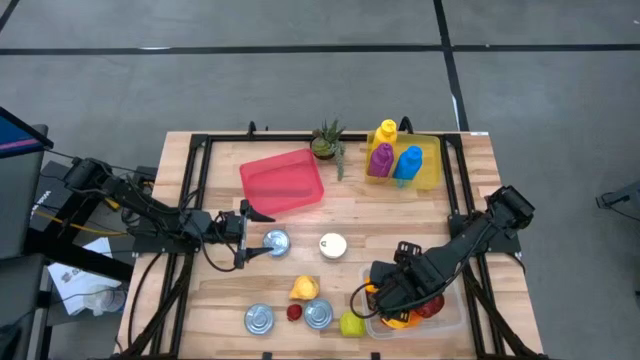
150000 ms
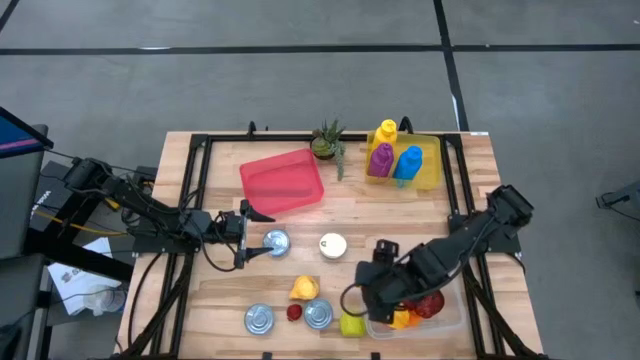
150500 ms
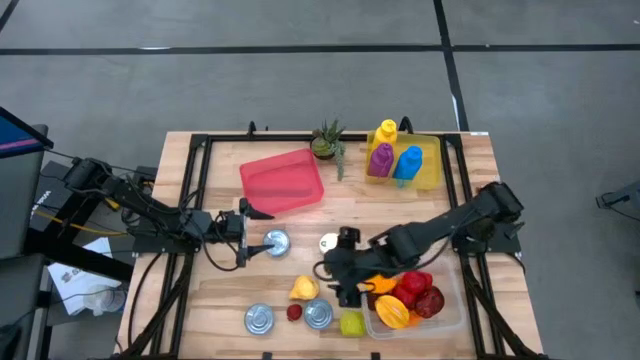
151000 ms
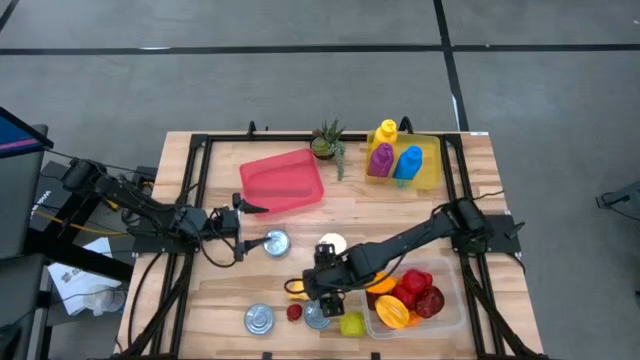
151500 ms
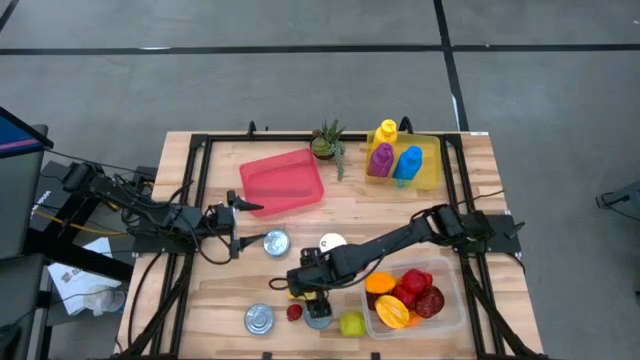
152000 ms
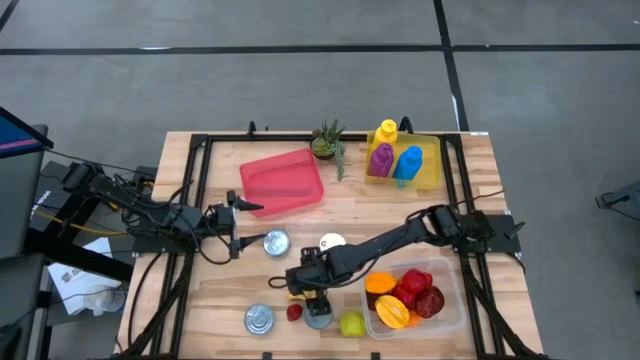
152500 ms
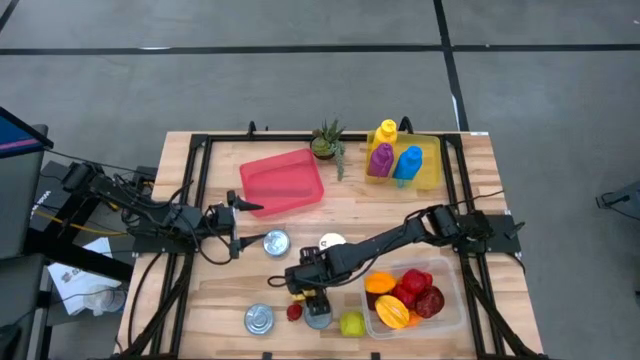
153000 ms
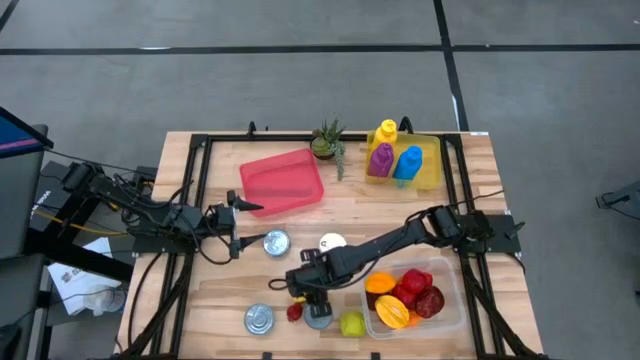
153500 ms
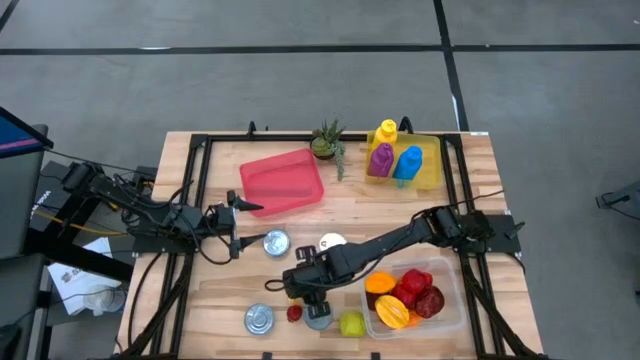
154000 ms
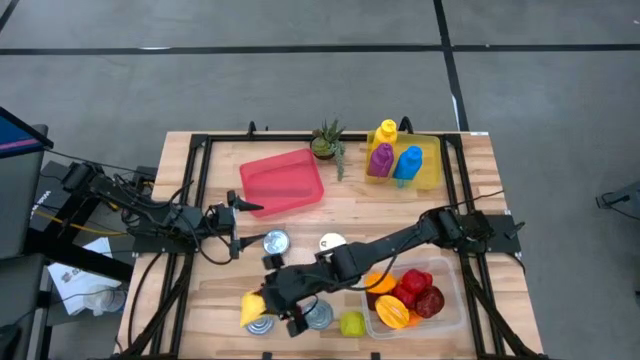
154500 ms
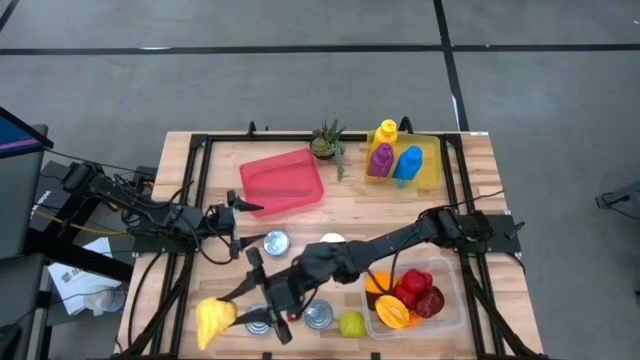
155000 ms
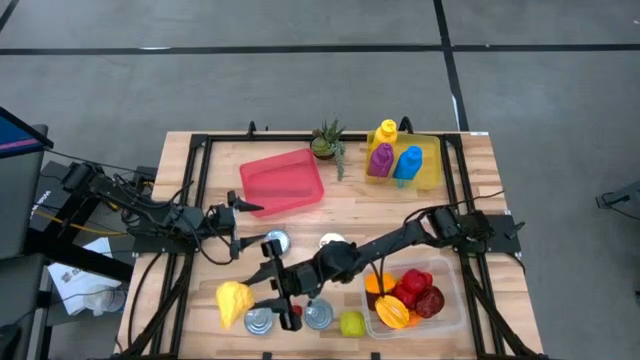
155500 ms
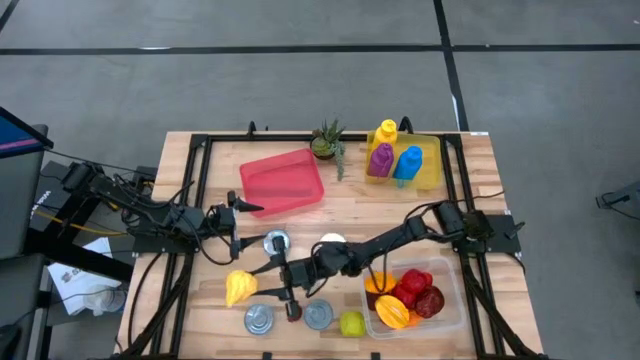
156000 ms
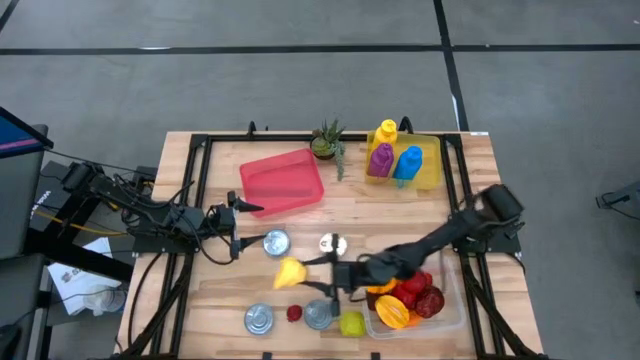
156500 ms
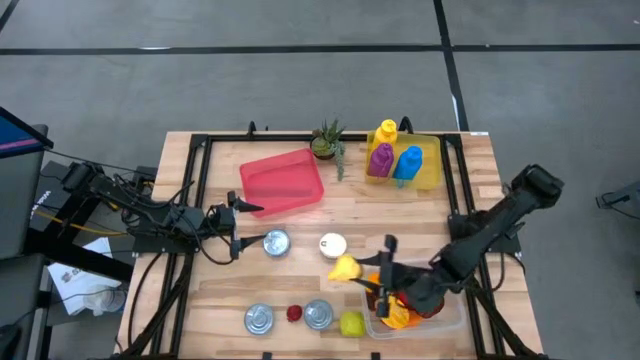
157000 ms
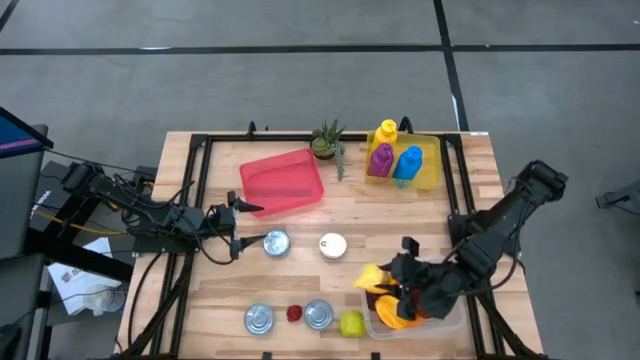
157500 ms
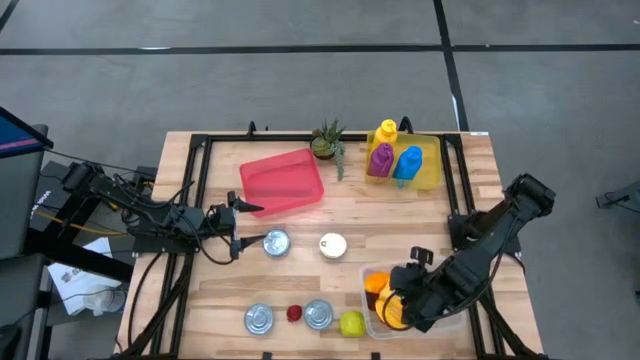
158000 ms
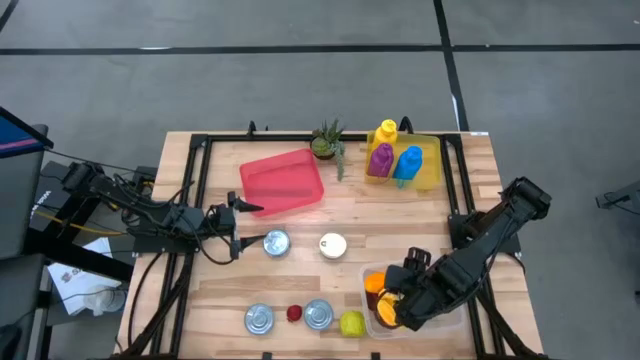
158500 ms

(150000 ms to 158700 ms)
Task: Pick & Place Food Item
Put the yellow pear into the transparent bin

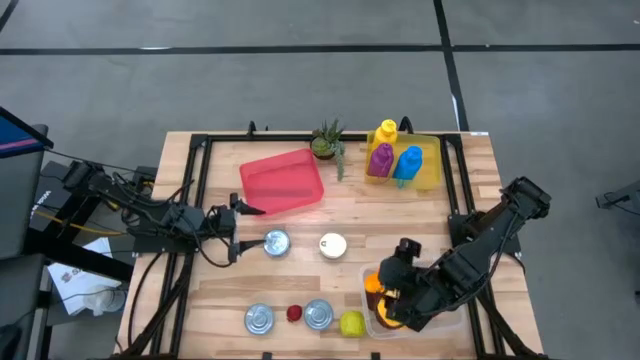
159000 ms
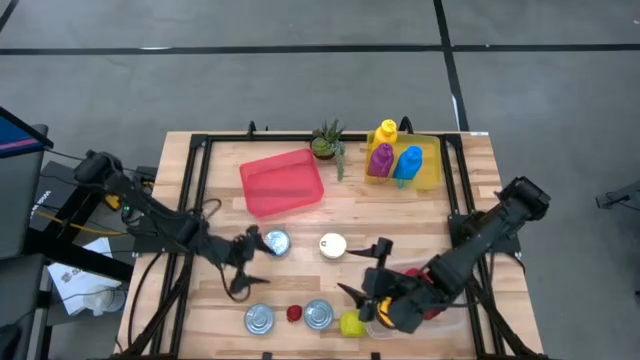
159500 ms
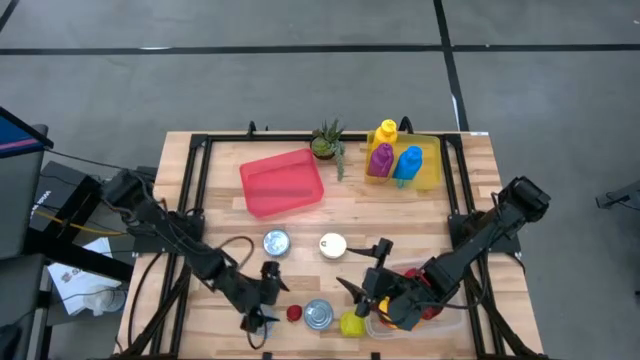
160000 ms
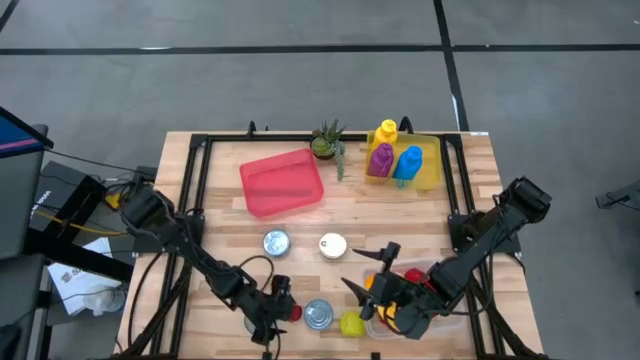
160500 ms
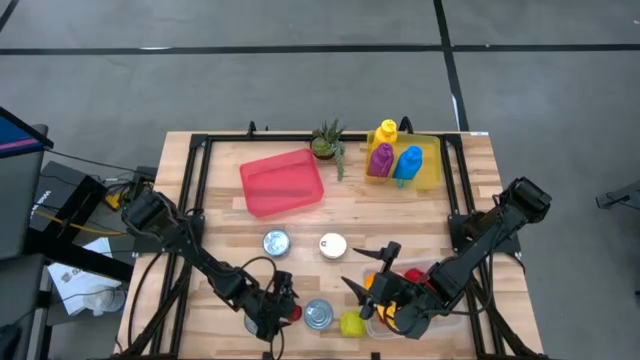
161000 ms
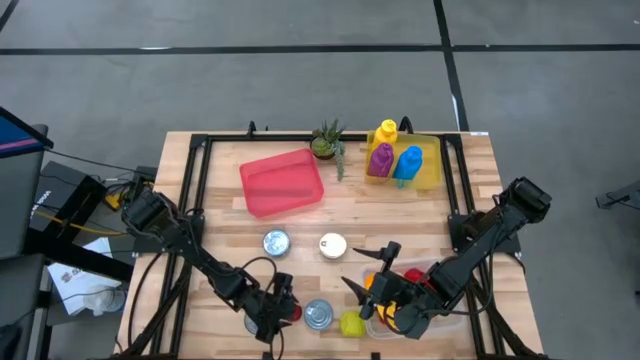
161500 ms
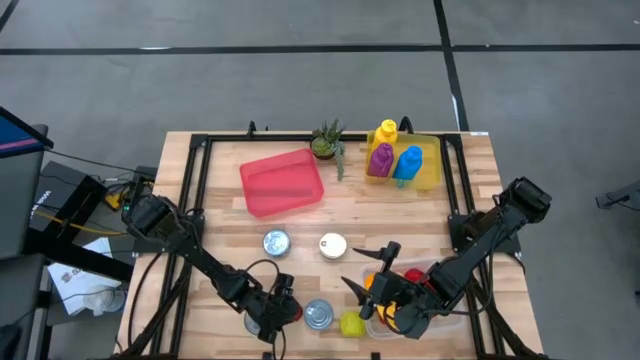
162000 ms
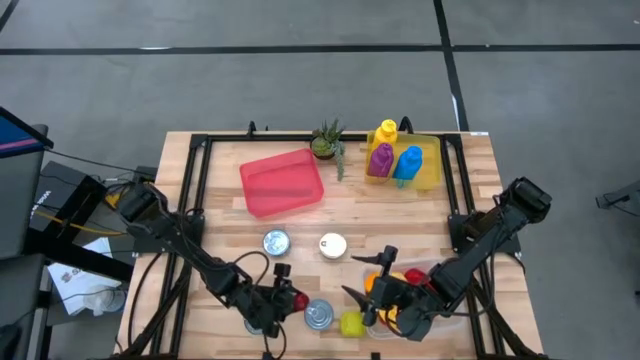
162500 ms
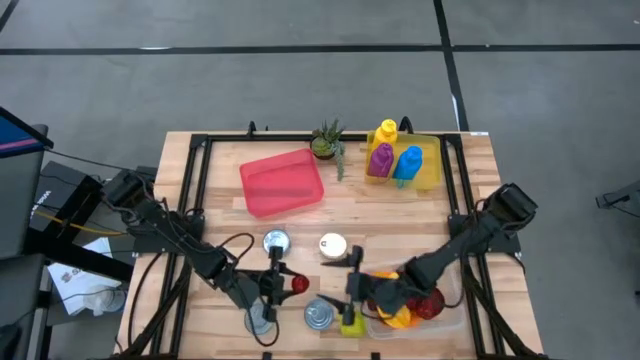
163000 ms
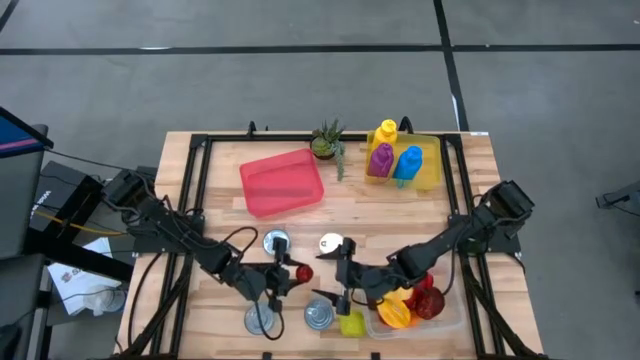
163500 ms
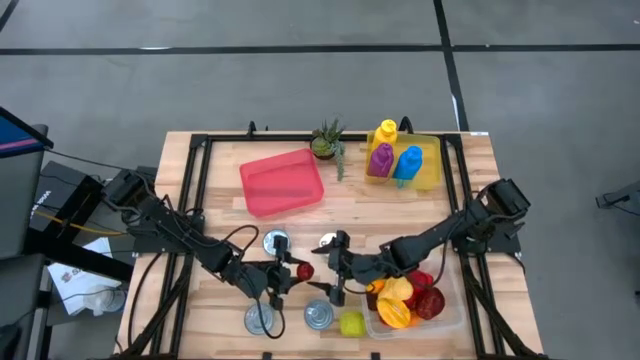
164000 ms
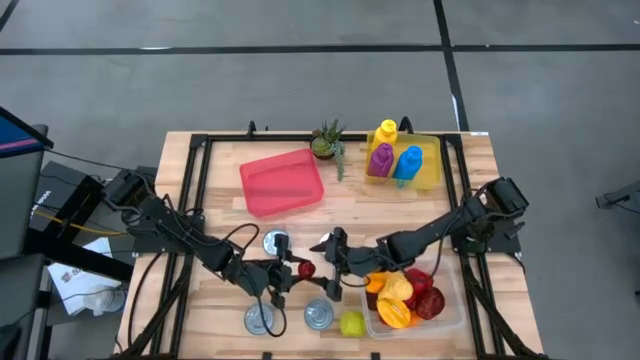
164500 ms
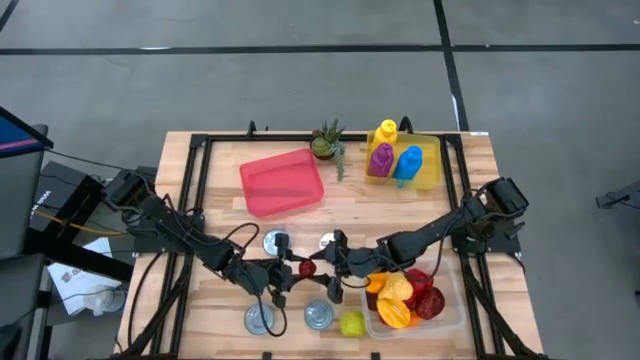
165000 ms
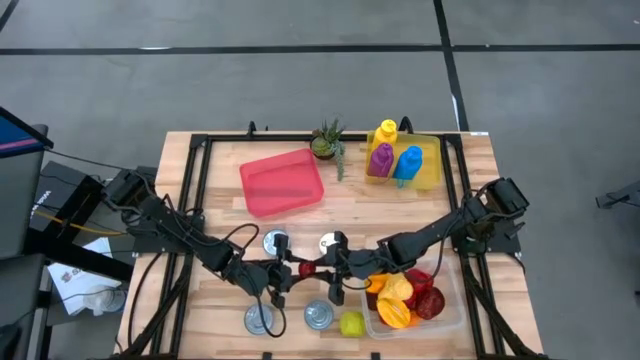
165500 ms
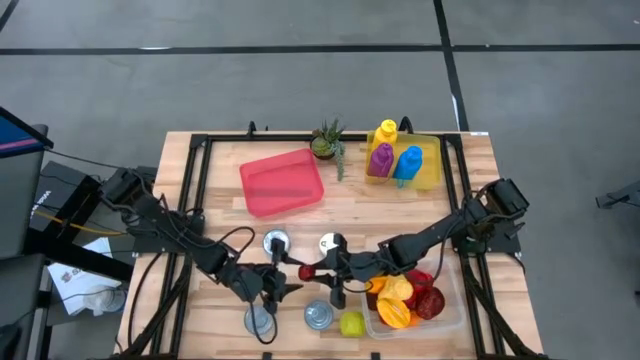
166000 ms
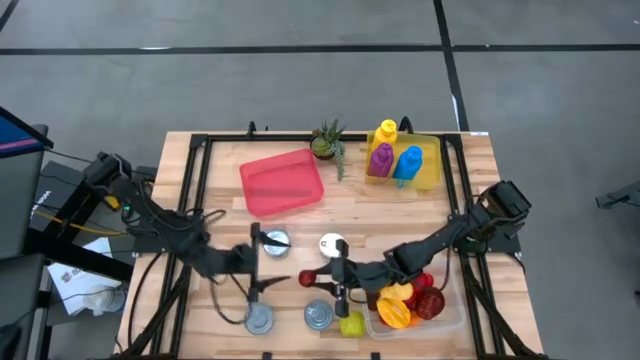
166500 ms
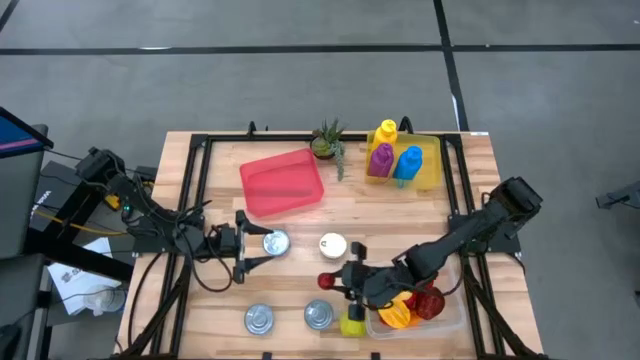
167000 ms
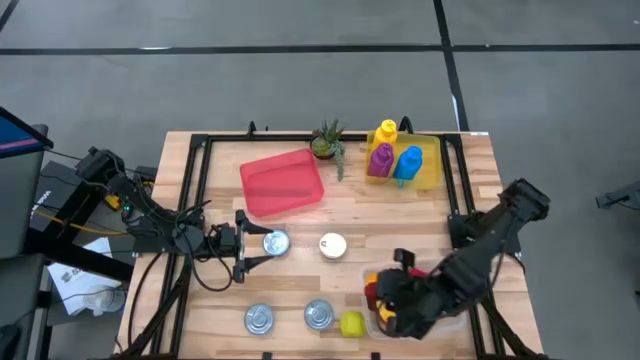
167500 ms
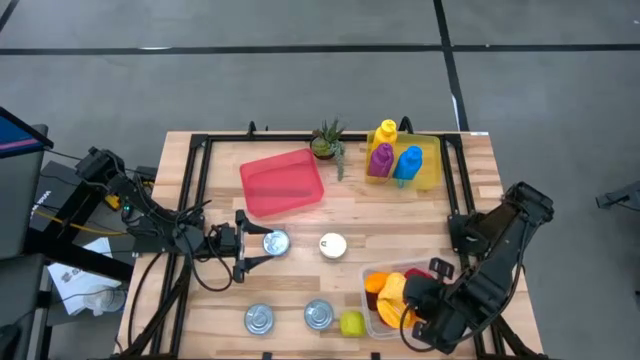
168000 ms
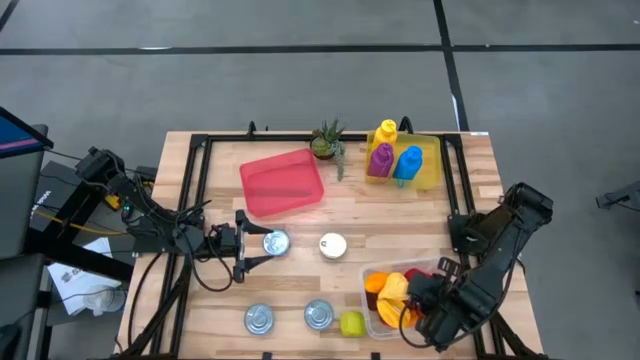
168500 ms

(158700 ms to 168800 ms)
Put the pomegranate into the transparent bin
